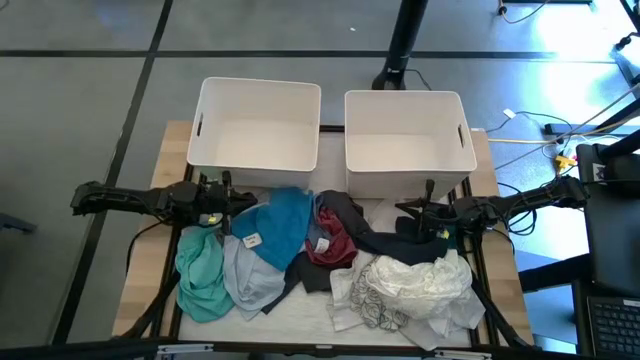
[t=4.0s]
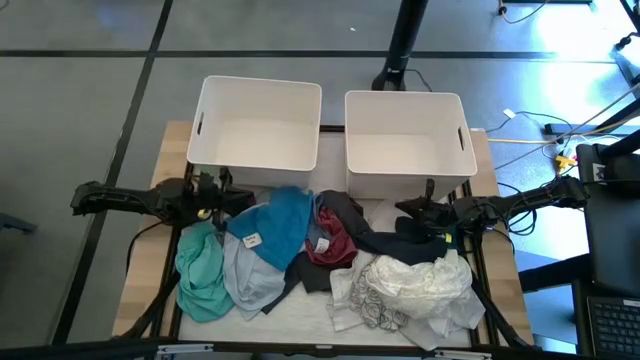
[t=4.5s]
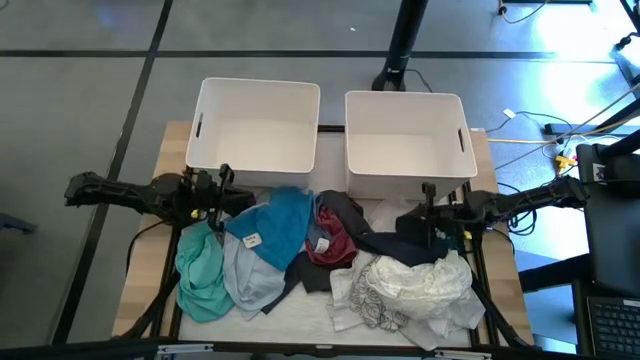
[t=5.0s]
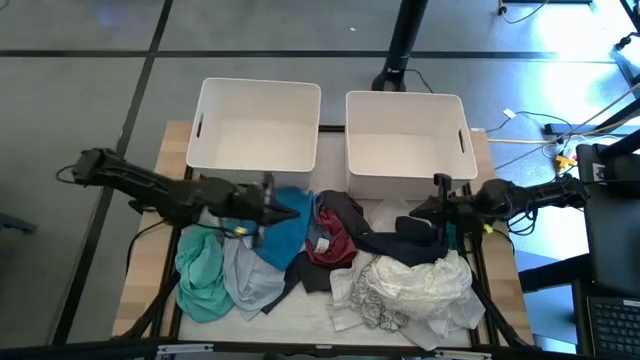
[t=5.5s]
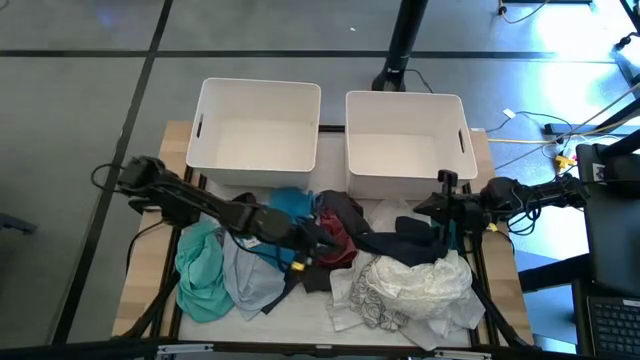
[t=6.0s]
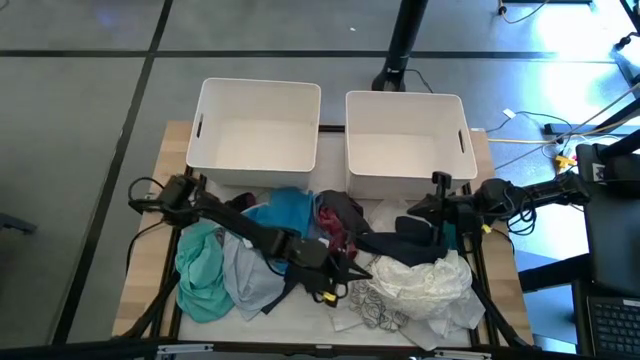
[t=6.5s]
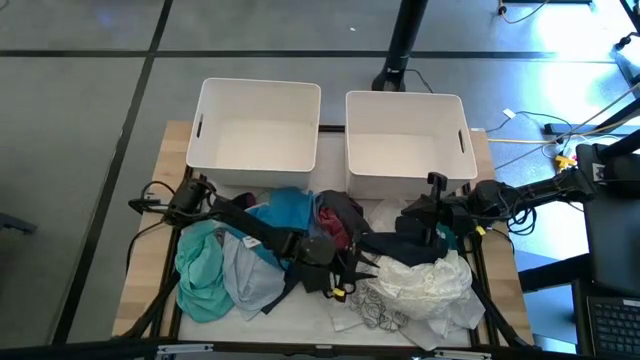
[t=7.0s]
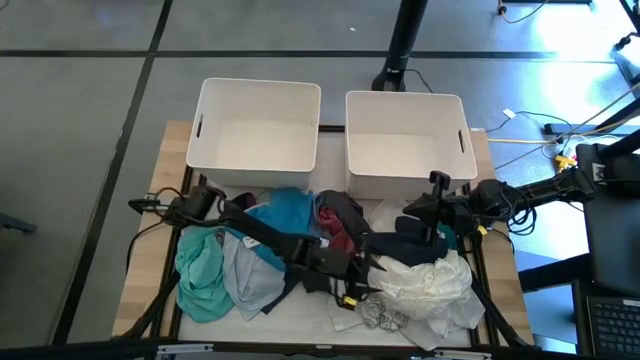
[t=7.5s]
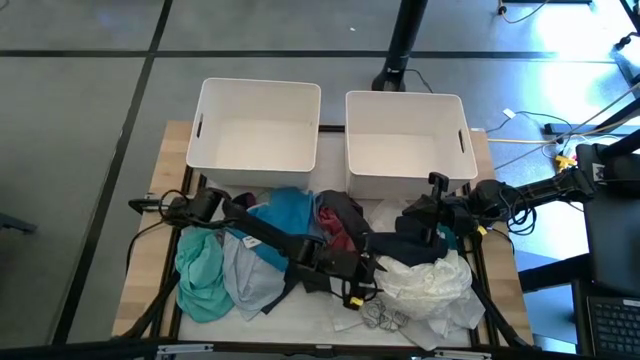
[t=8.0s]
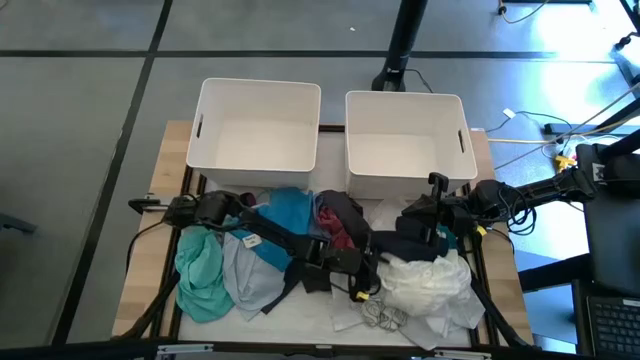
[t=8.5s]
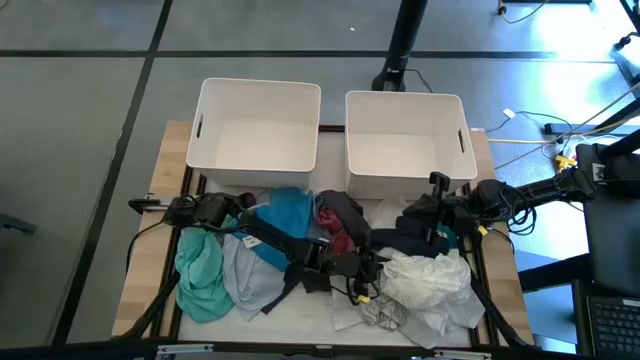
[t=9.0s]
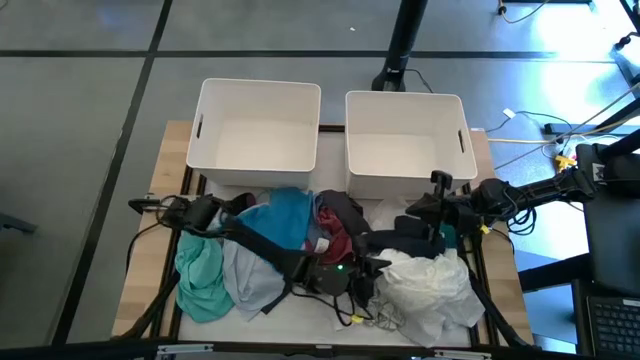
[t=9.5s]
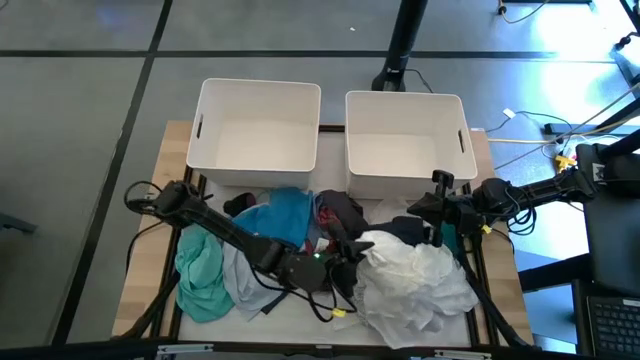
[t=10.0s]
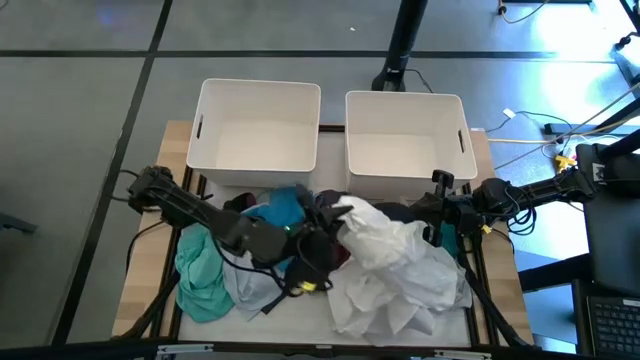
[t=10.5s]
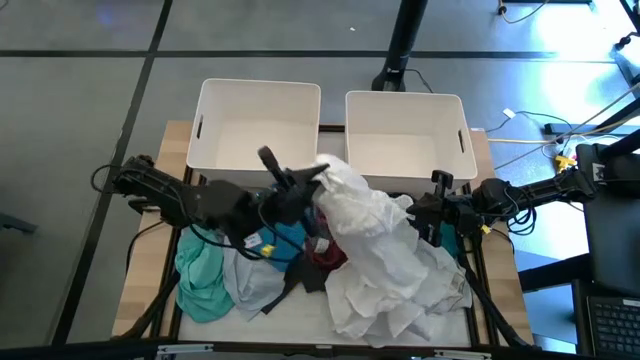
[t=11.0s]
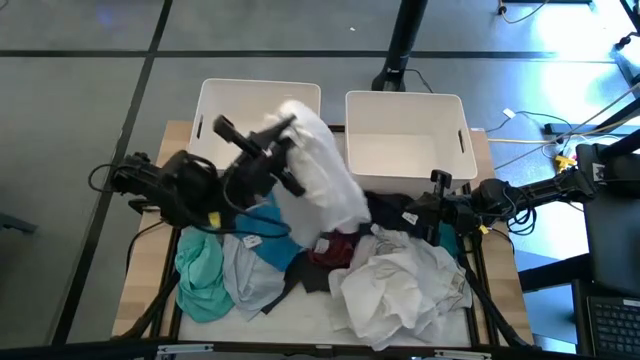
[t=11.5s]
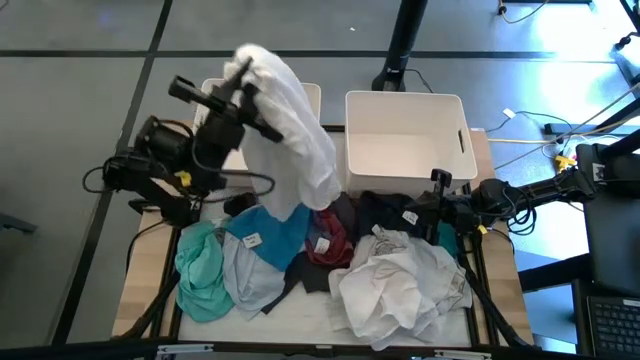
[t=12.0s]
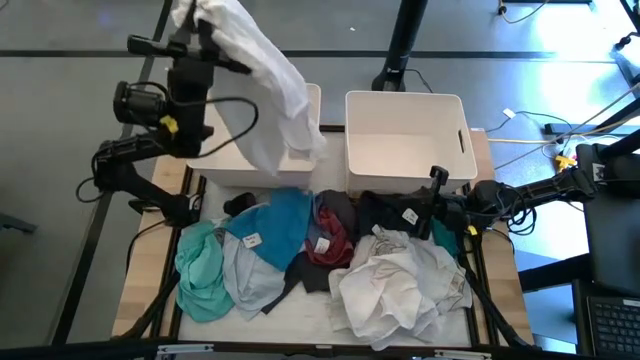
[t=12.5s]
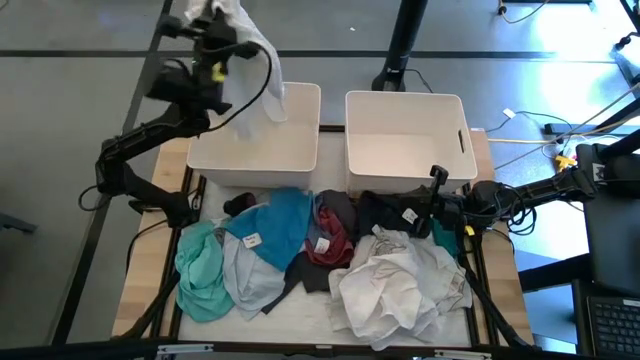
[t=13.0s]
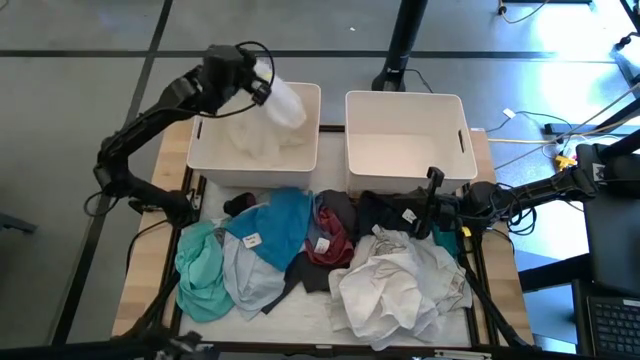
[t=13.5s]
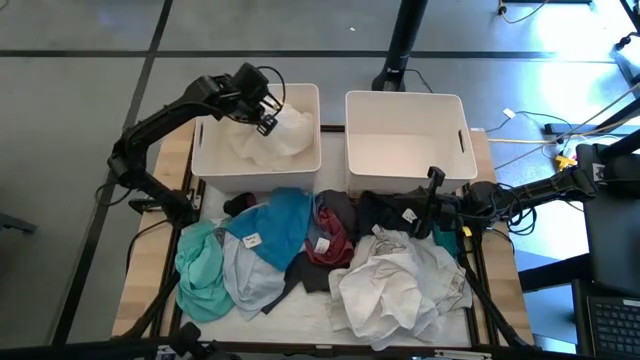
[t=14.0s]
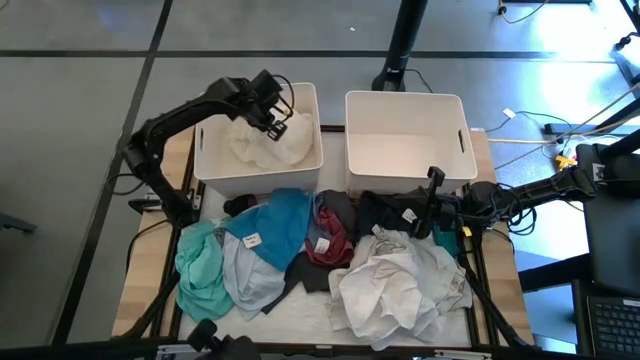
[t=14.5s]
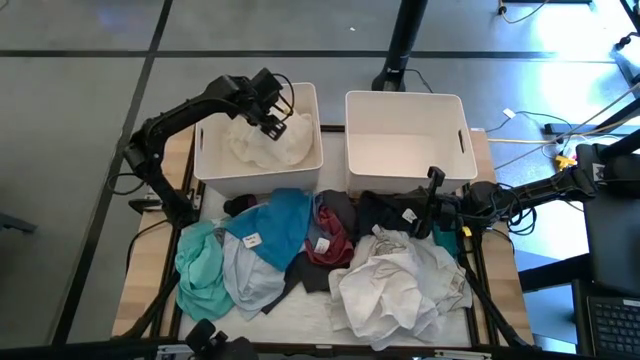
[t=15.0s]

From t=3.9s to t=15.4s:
Task: Sort clothes
Put the white blouse into the left white bin

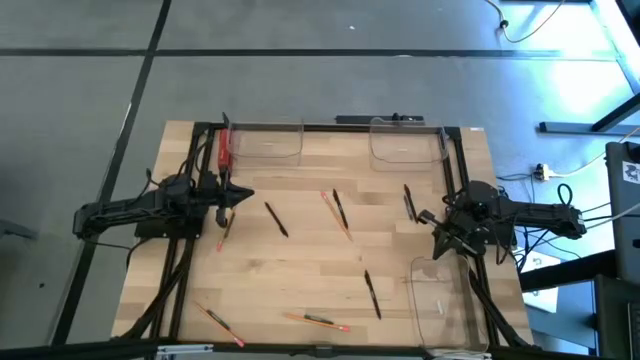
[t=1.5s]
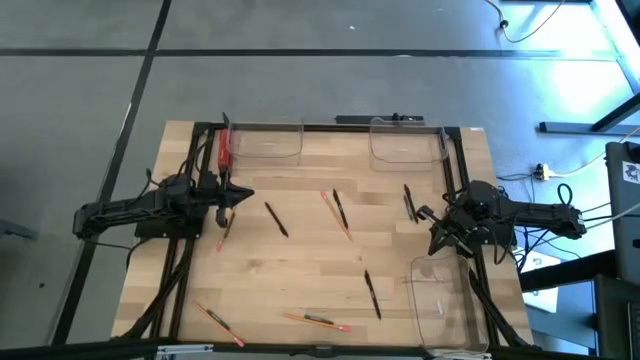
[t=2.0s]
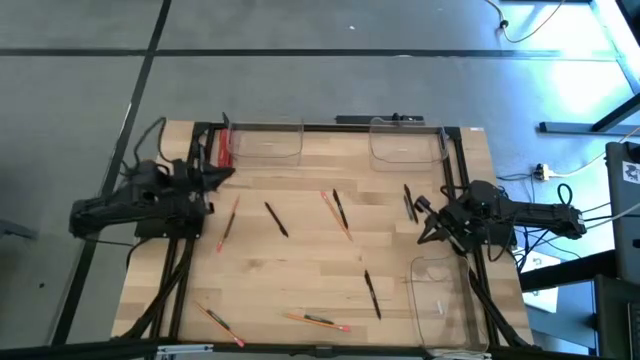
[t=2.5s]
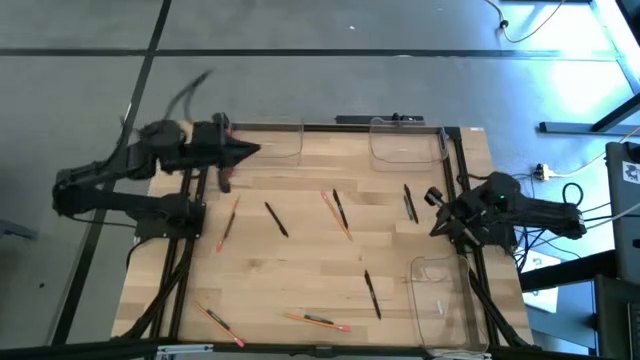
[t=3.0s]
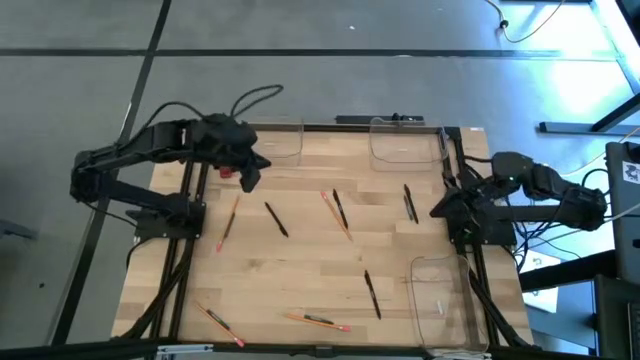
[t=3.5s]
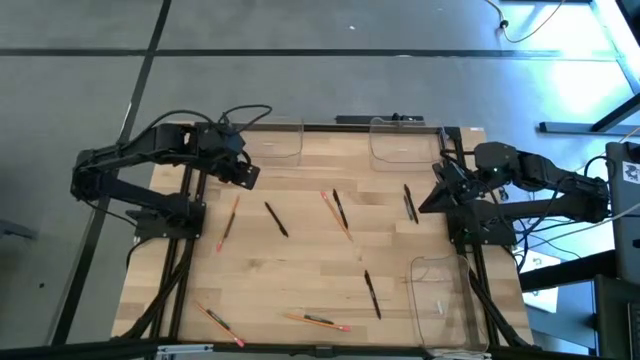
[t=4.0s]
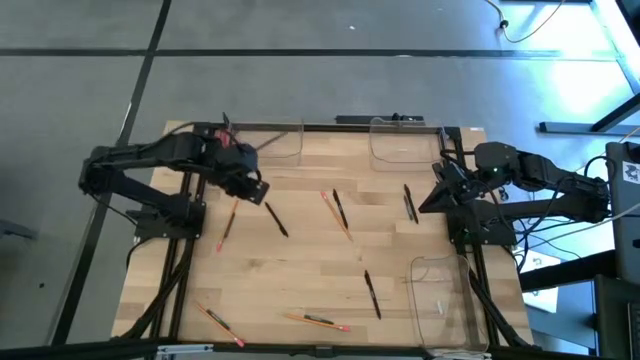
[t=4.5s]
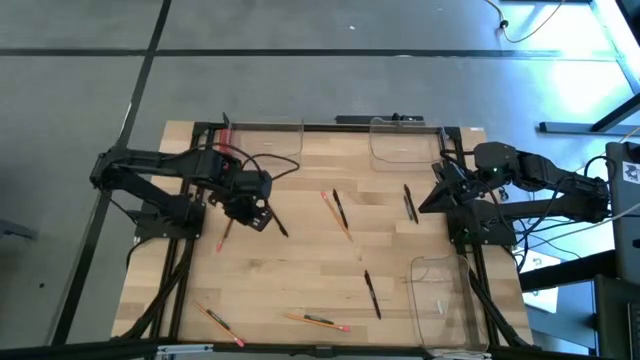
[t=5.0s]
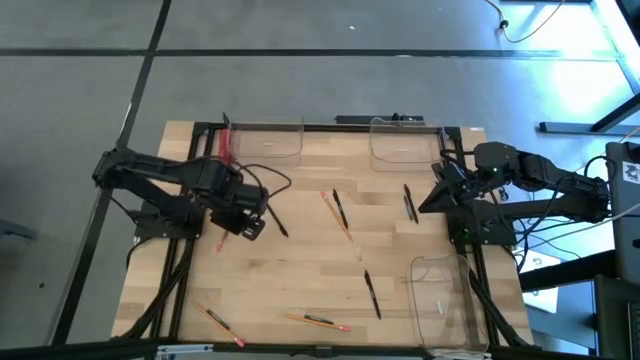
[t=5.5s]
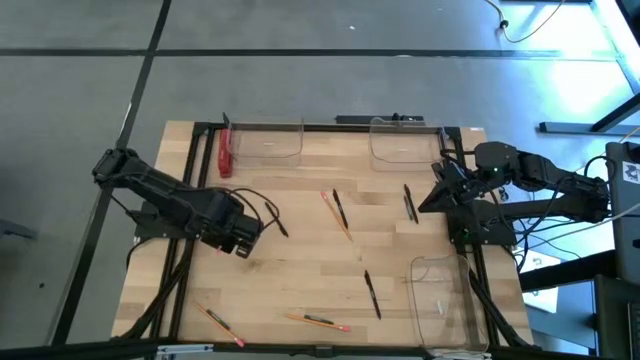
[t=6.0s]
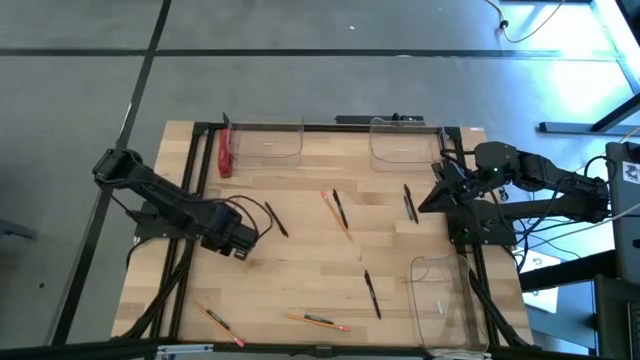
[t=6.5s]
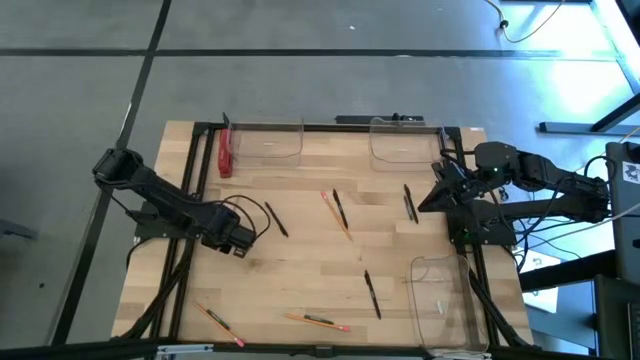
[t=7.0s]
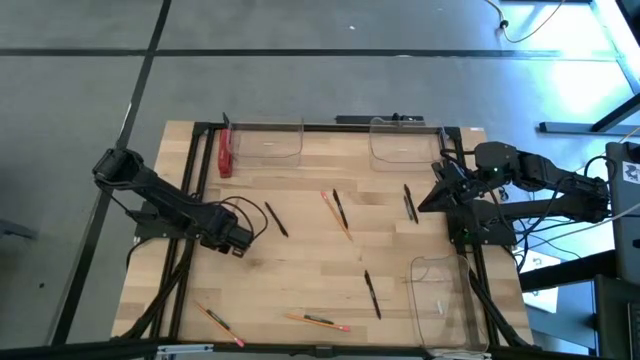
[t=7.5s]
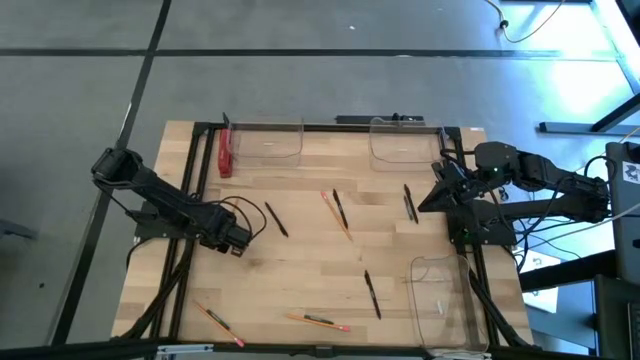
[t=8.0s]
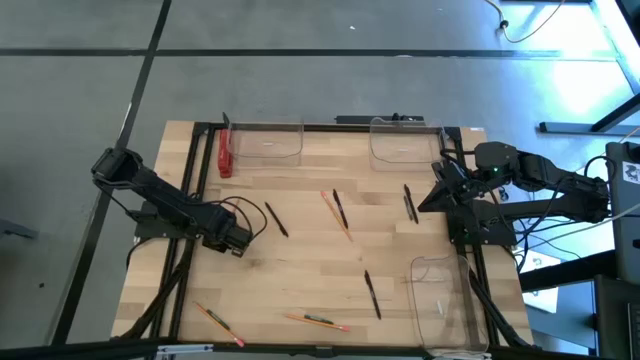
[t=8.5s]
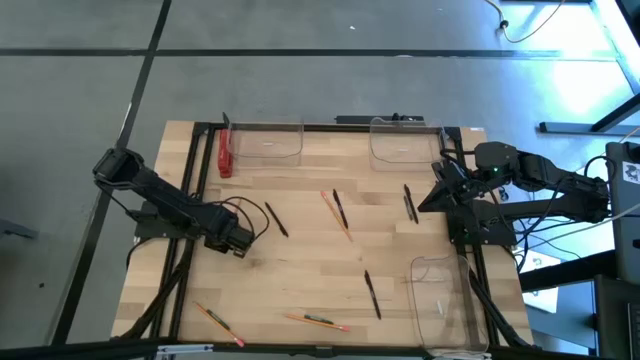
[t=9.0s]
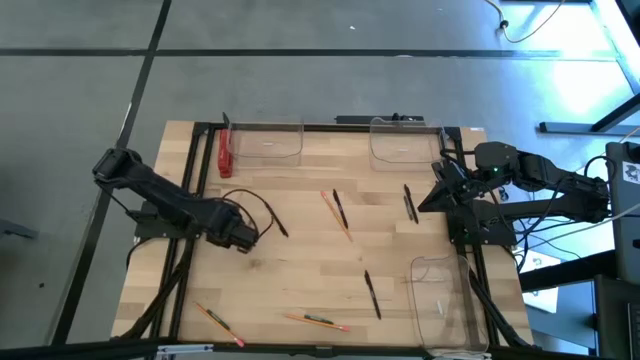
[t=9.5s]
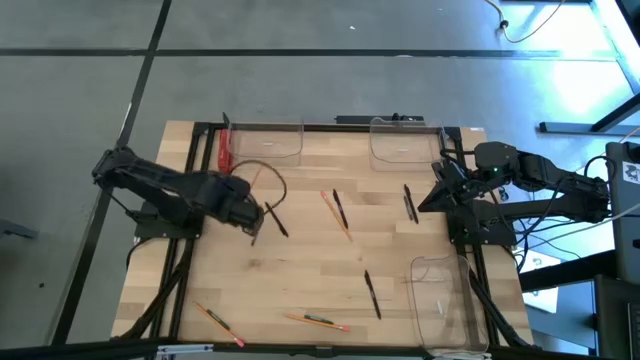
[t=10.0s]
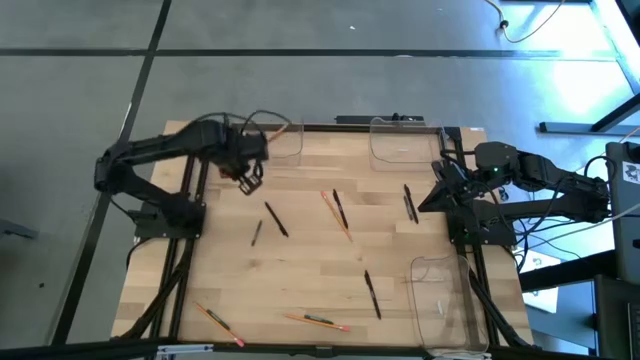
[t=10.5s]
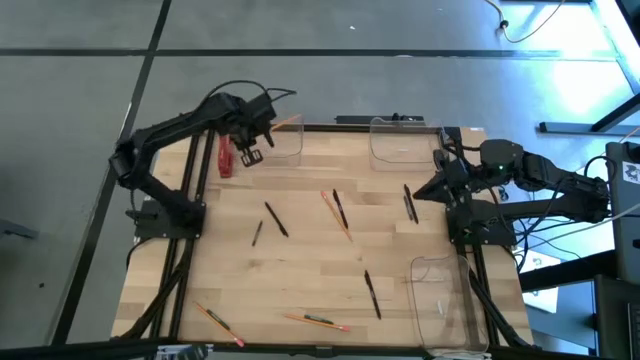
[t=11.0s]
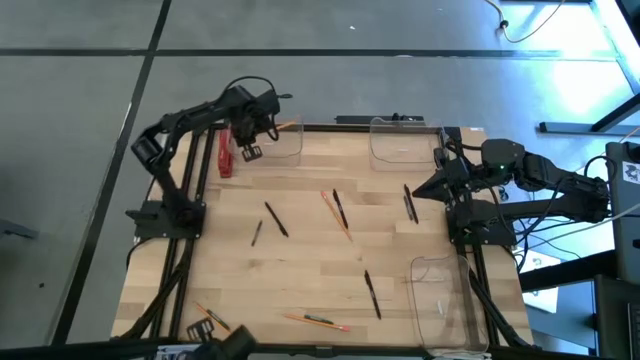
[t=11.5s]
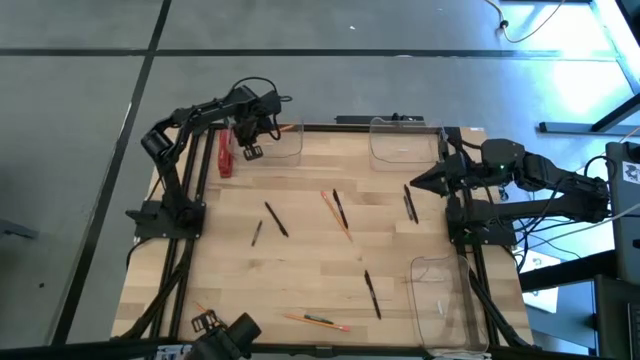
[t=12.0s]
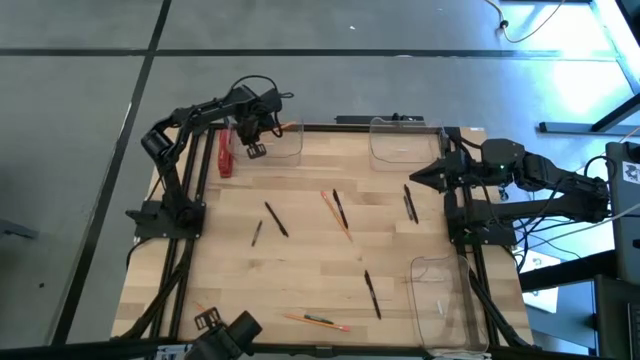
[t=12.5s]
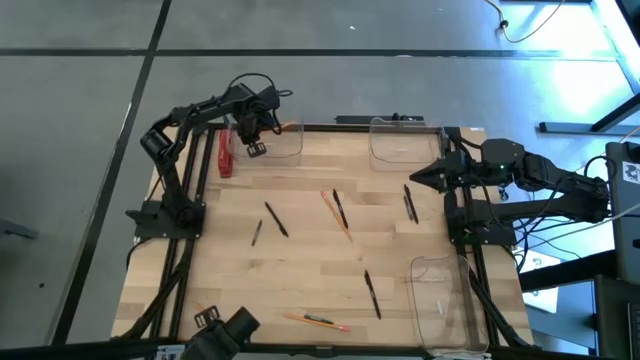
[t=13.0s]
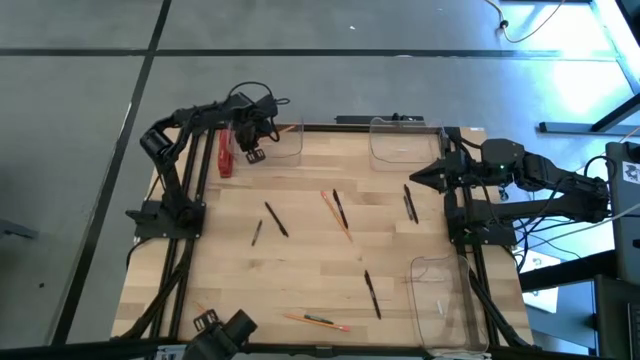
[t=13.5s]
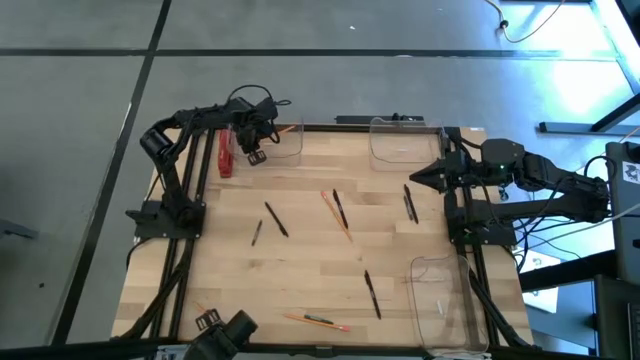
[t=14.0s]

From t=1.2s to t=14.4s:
Task: Sort crayons/erasers/pens/pencils in bins
Put the top left yellow pencil into the top left transparent bin
